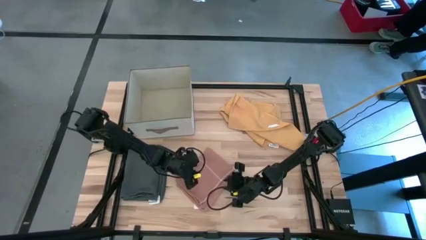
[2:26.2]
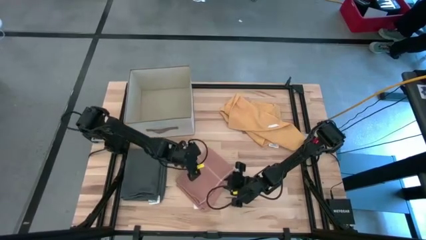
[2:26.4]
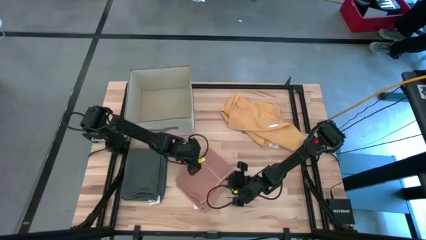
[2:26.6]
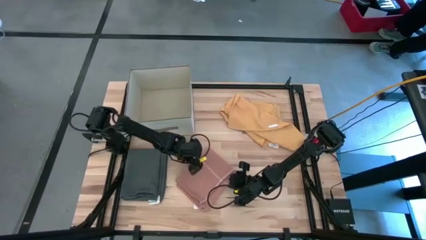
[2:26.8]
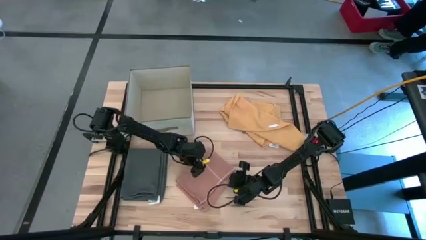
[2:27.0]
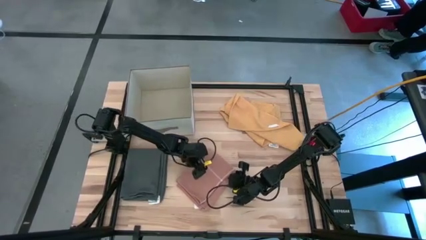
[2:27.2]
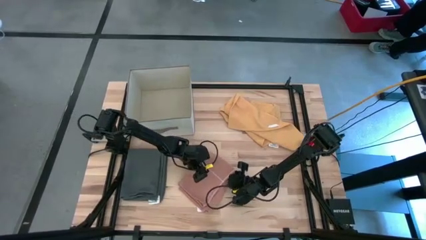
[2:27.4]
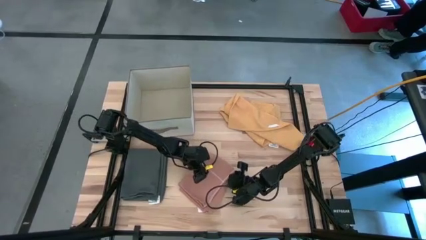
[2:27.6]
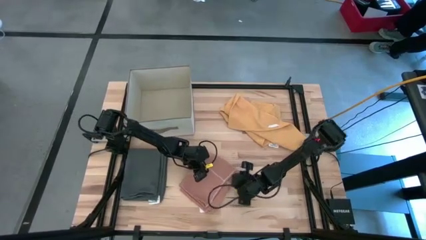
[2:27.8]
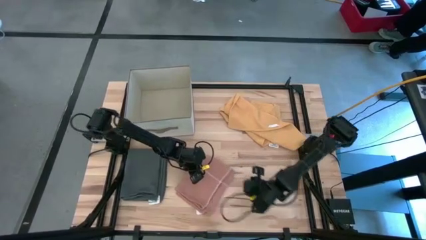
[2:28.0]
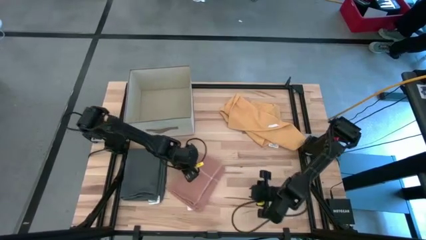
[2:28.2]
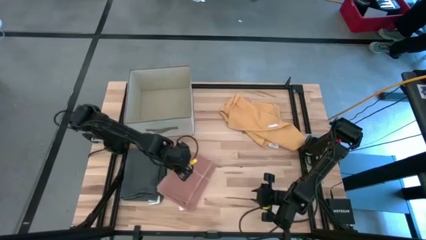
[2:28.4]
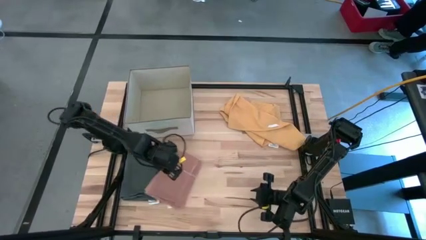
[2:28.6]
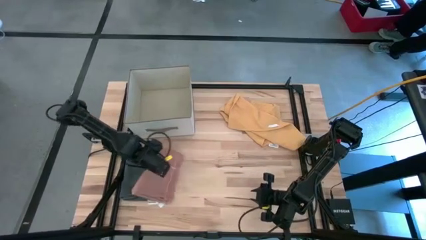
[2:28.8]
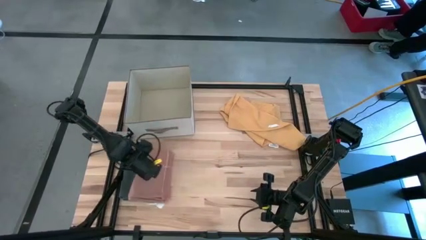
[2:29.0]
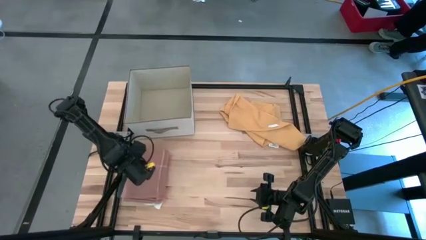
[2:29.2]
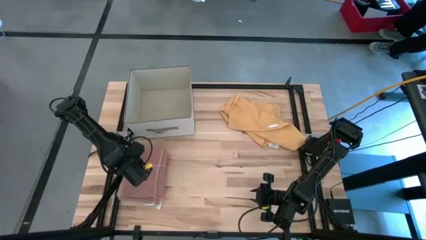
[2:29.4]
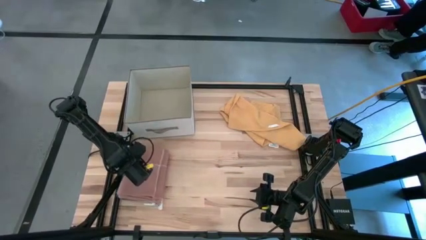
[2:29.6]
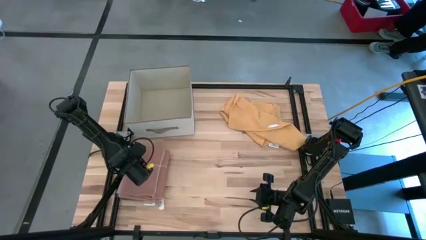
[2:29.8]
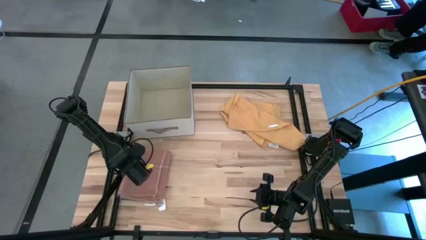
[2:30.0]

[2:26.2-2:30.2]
Task: Fold towel
Stack the light orange towel on the grey towel

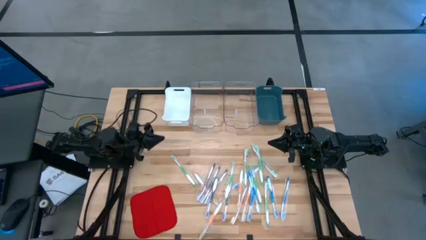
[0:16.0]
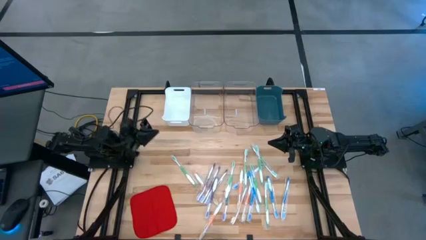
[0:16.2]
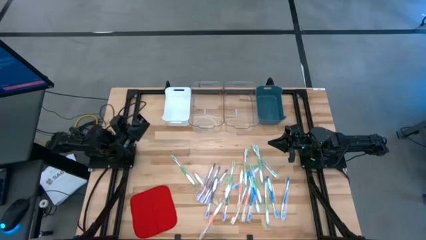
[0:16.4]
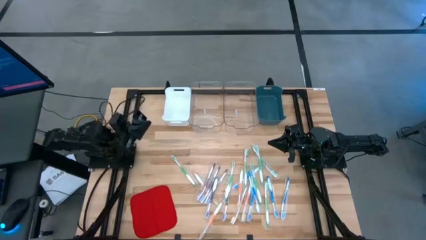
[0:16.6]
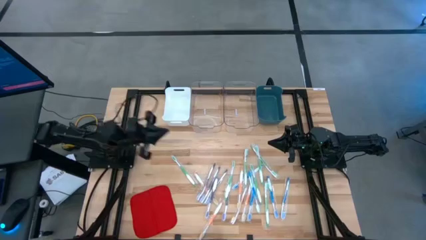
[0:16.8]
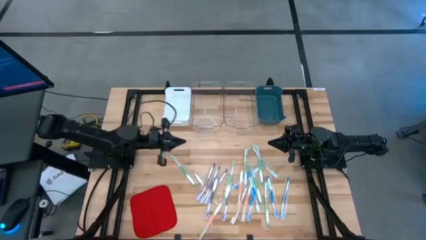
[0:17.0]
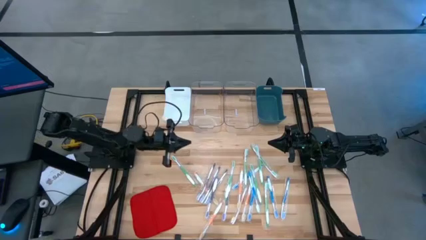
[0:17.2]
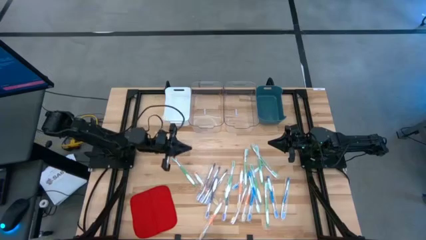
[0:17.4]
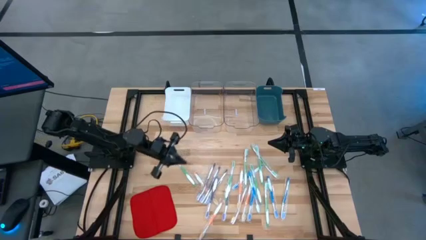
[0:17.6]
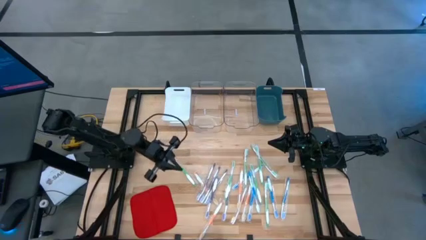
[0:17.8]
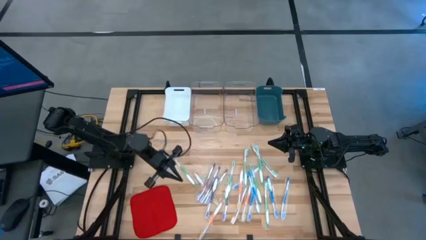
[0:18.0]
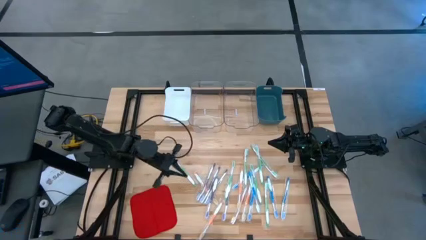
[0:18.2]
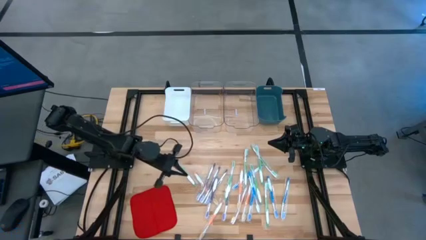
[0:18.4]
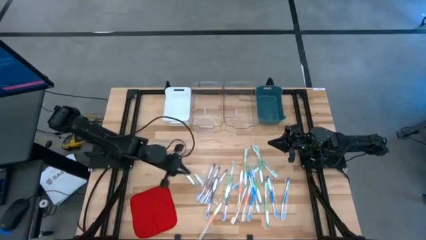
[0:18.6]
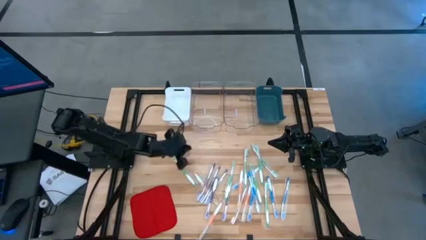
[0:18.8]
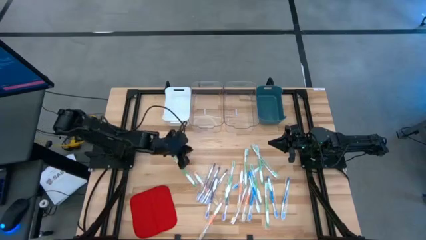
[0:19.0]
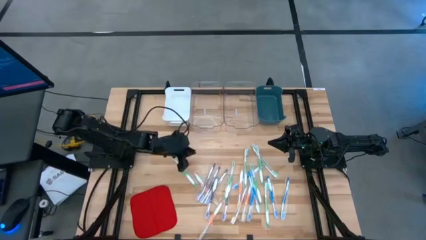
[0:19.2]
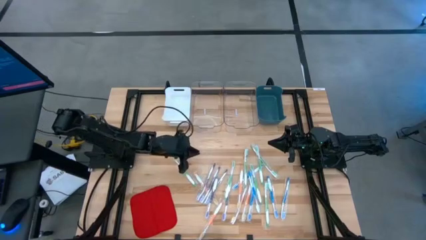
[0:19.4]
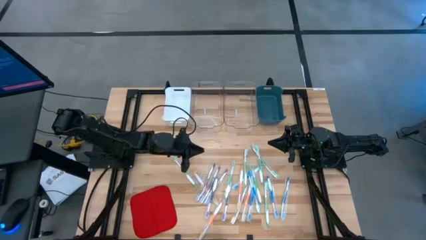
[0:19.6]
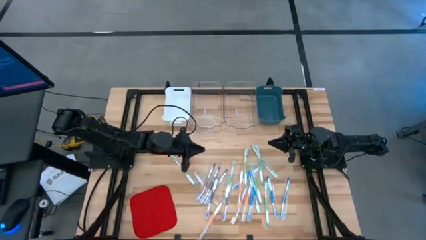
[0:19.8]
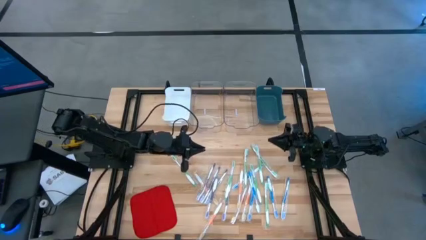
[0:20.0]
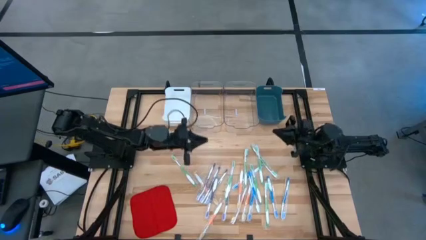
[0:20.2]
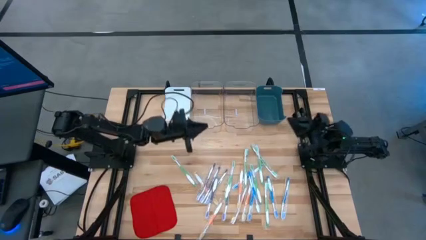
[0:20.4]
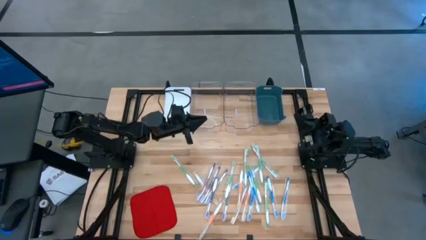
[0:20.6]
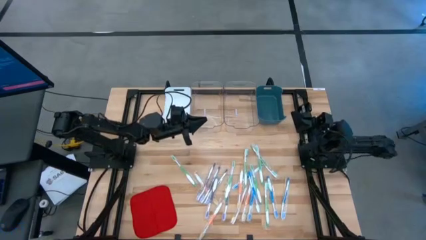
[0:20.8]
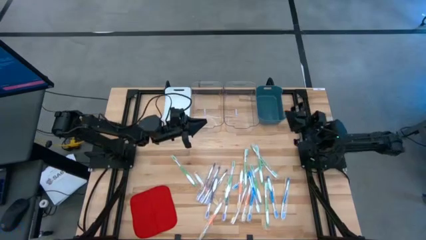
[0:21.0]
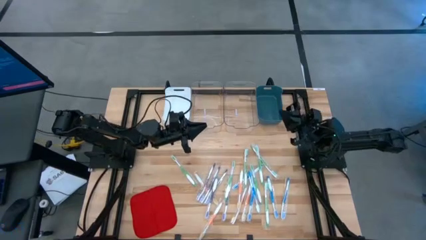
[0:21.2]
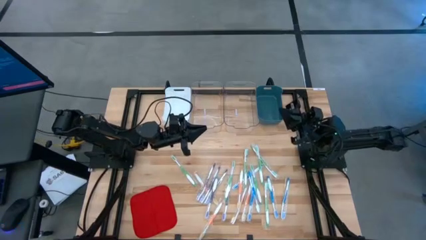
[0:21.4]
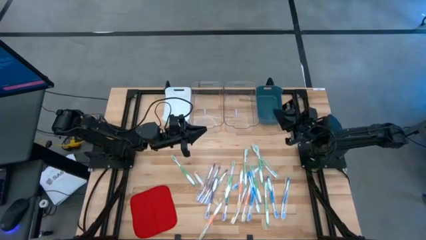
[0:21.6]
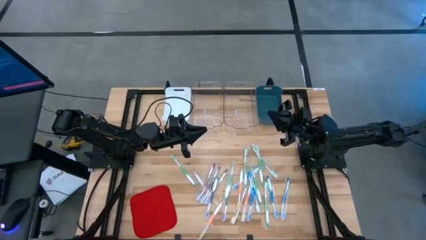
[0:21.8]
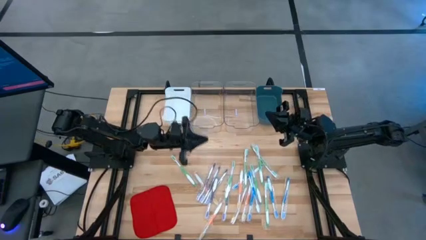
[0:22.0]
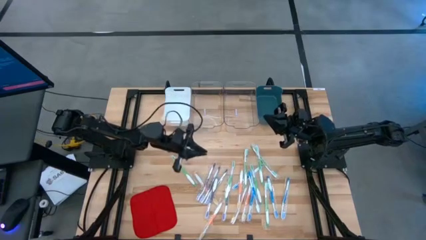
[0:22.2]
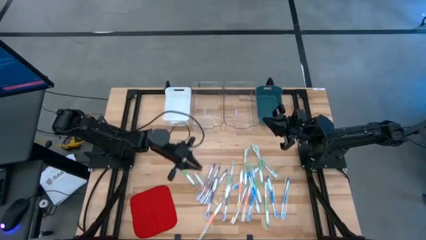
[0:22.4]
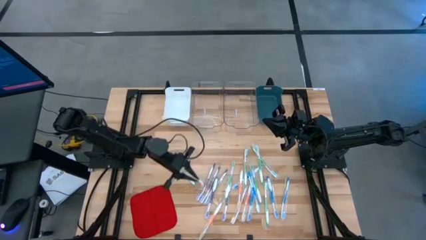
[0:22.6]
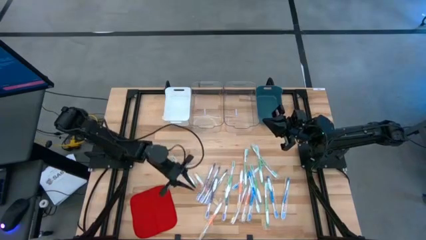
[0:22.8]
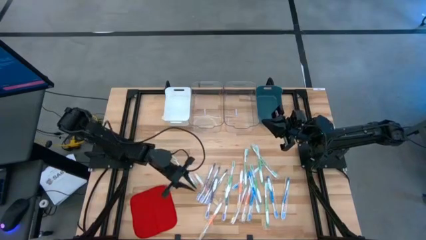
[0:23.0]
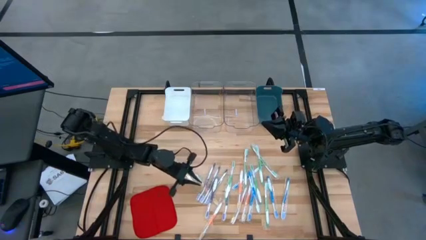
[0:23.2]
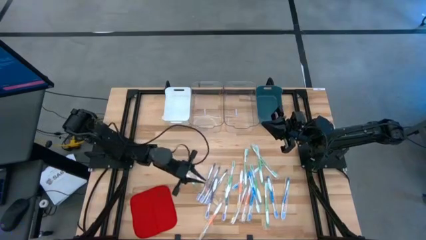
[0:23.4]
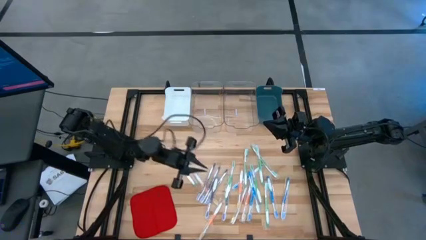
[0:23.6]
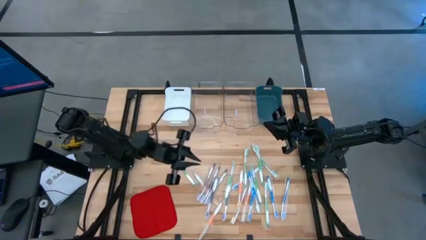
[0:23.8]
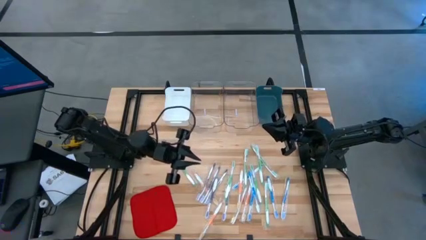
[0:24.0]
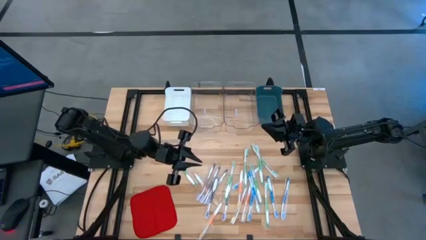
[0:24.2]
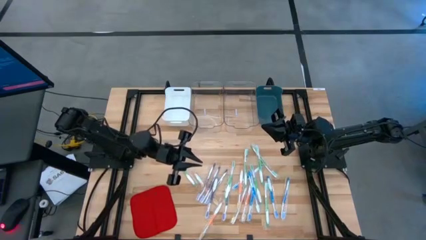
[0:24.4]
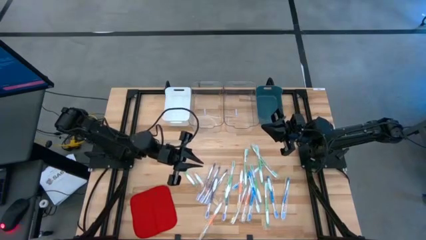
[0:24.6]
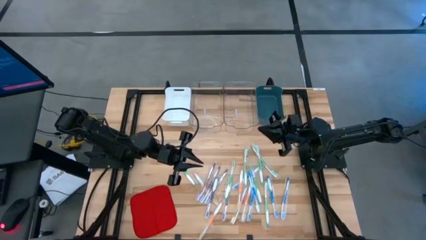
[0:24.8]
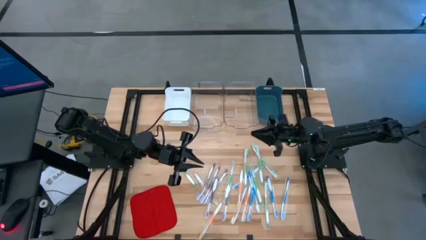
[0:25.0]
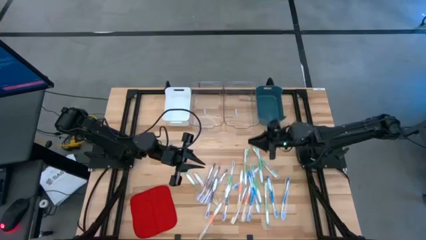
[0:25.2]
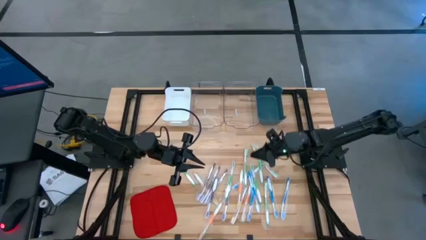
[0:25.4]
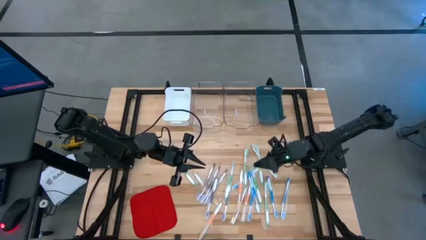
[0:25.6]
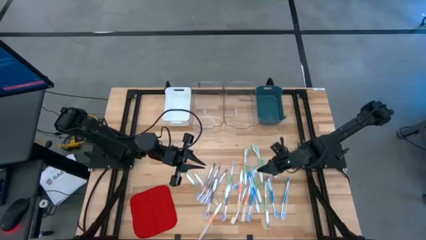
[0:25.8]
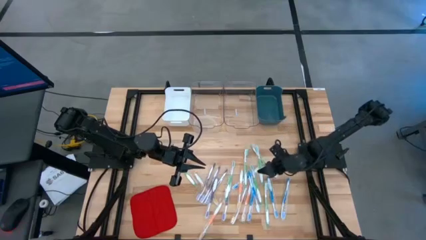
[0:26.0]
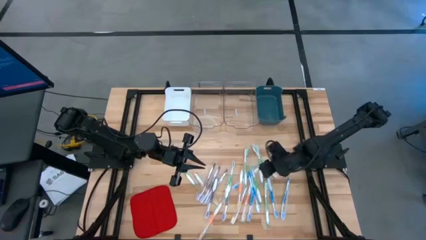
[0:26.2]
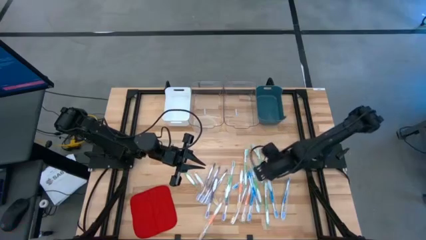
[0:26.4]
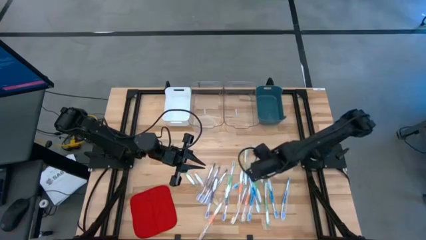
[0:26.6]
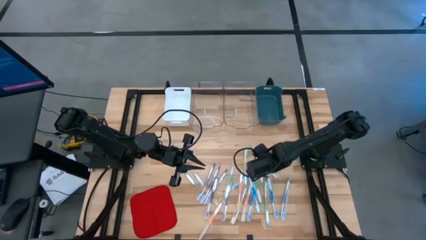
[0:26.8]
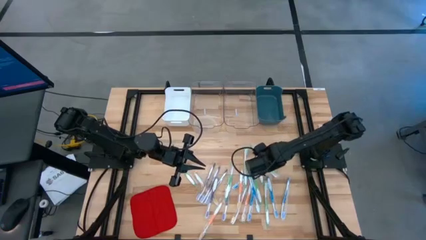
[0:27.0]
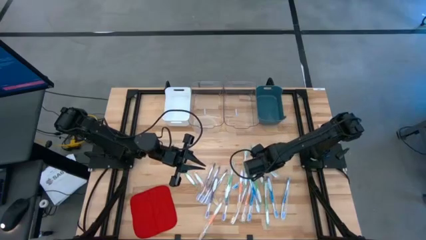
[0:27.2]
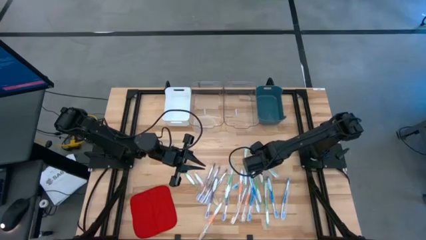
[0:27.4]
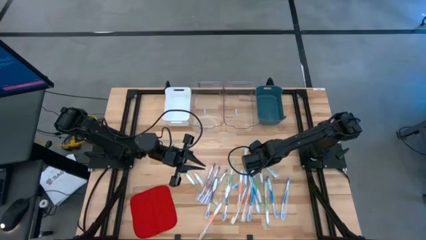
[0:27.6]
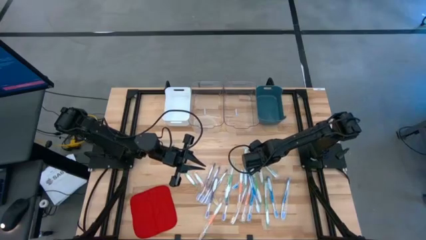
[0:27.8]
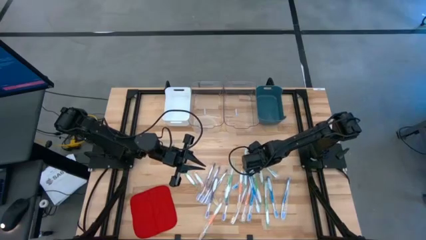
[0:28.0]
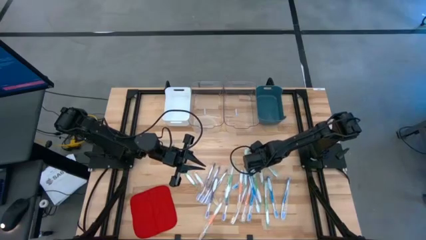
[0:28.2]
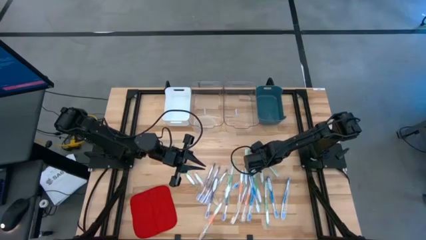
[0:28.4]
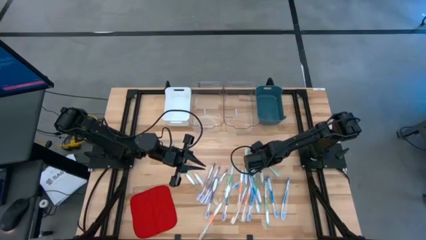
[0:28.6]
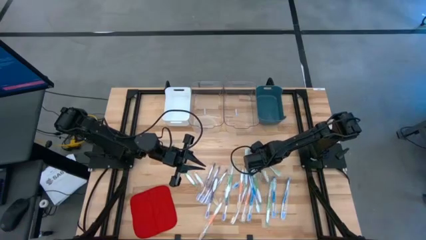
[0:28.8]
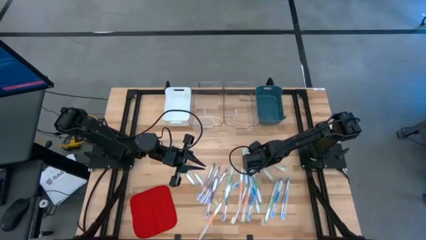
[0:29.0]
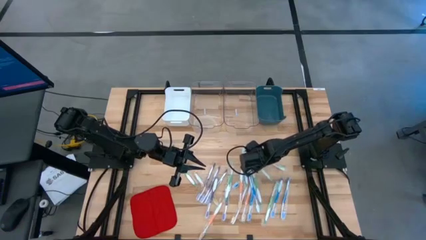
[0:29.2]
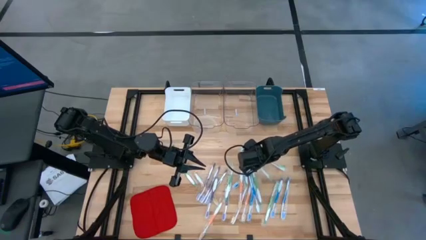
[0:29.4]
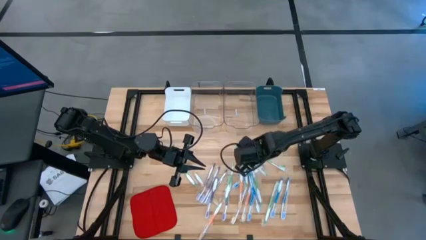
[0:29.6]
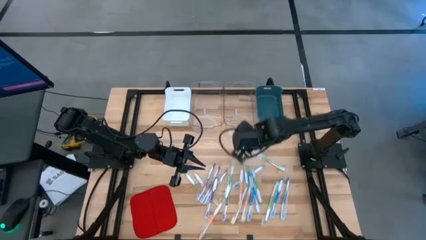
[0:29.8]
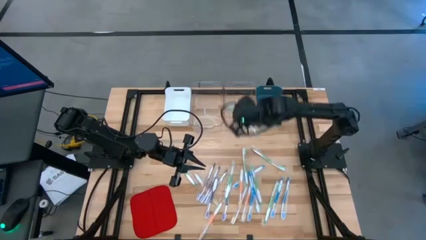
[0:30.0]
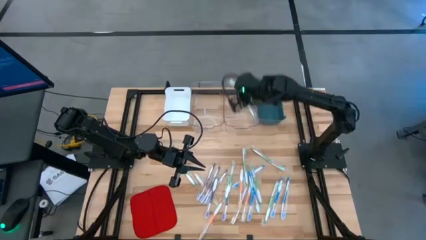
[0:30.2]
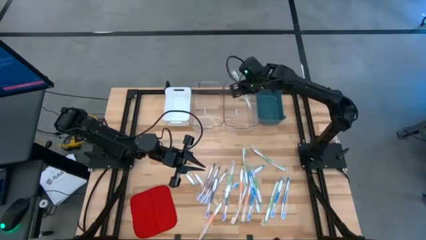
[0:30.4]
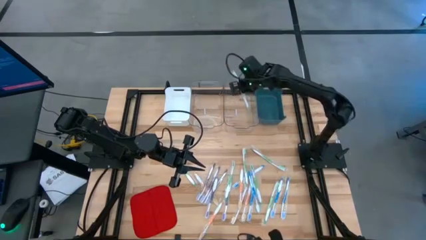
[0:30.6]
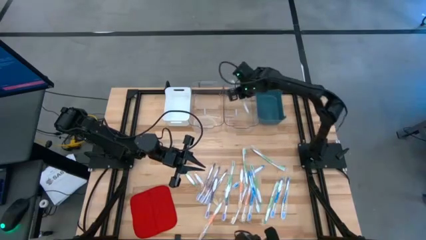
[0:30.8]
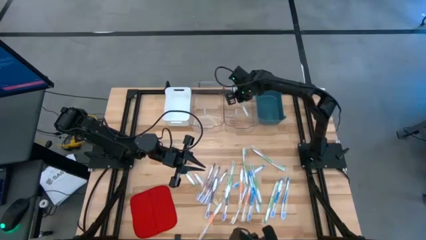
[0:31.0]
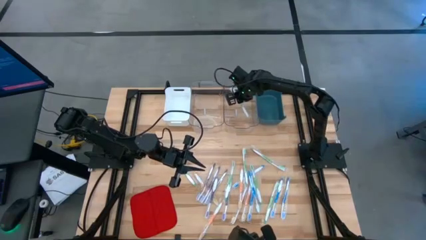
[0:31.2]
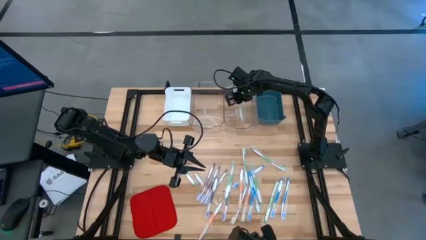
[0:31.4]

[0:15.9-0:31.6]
Task: Pick & Place Toothbrushes
Put the green toothbrush into the right transparent bin
